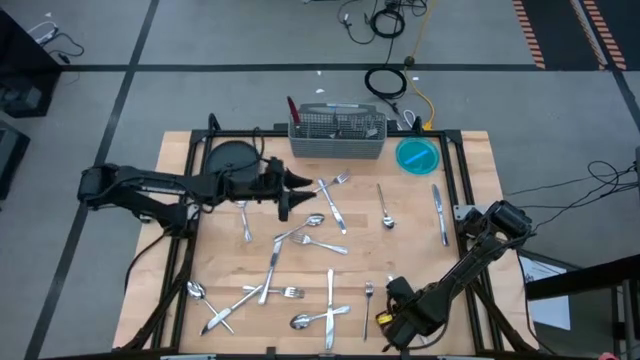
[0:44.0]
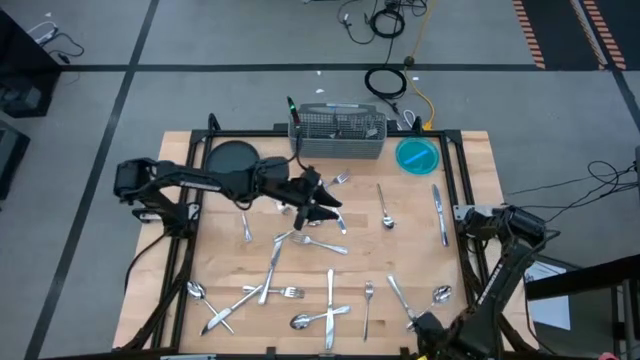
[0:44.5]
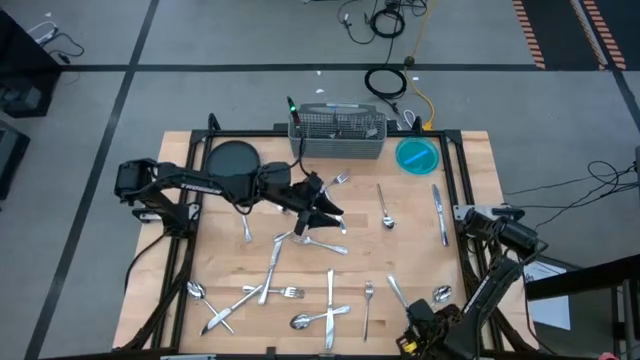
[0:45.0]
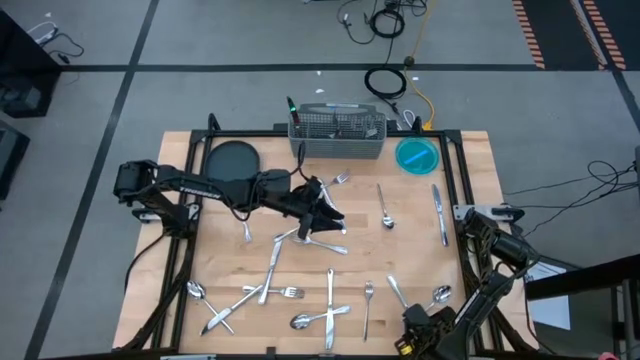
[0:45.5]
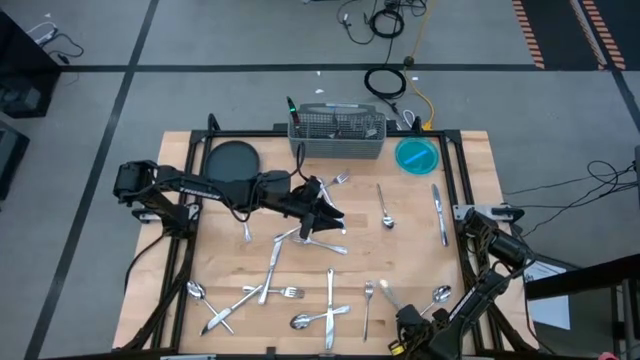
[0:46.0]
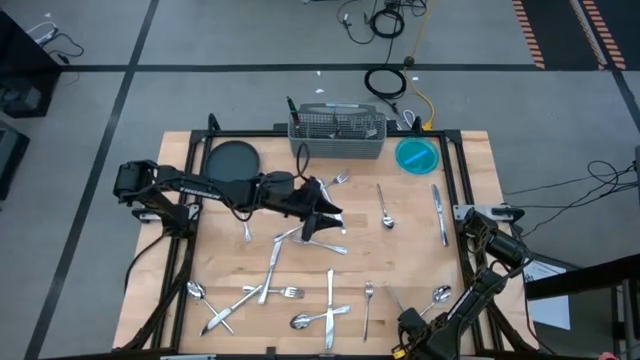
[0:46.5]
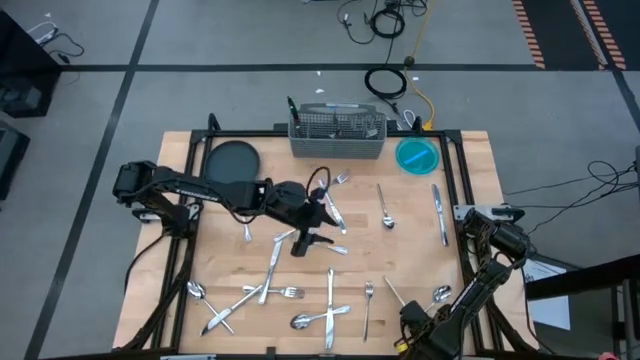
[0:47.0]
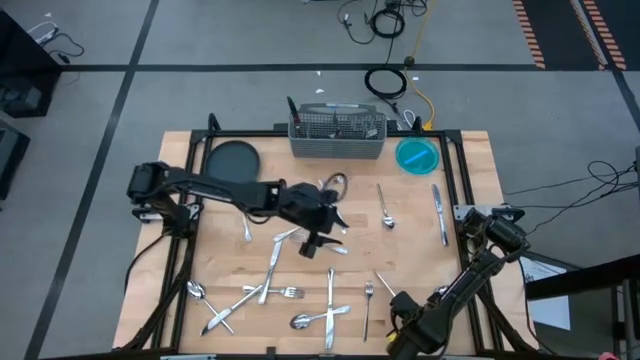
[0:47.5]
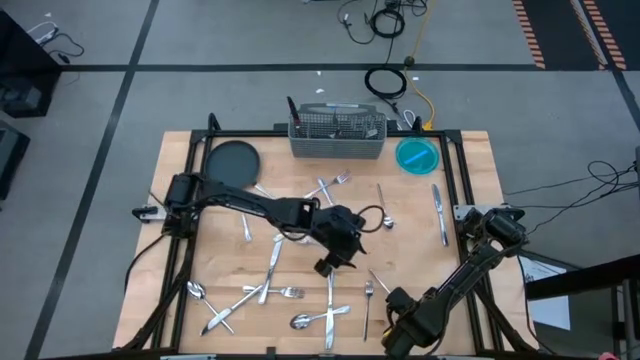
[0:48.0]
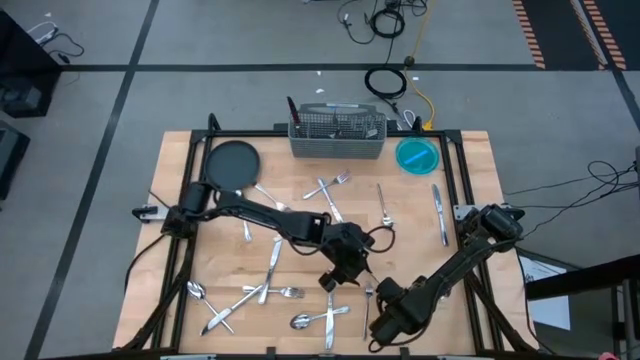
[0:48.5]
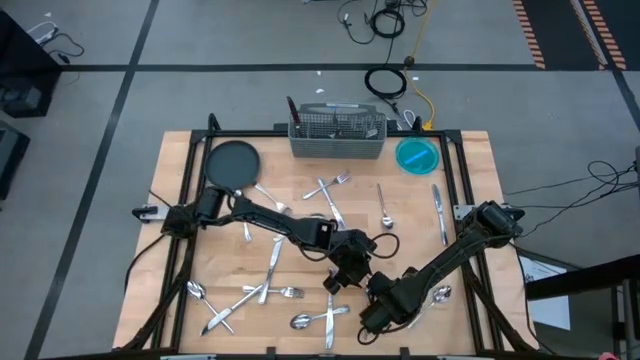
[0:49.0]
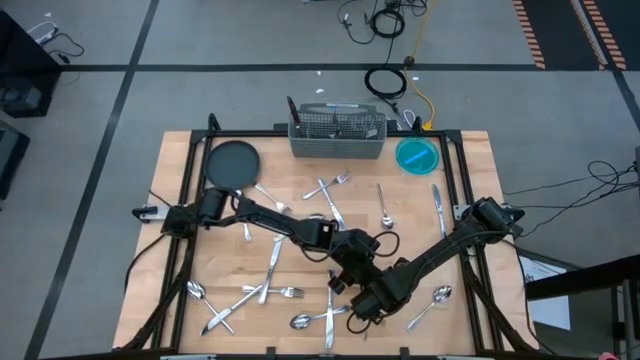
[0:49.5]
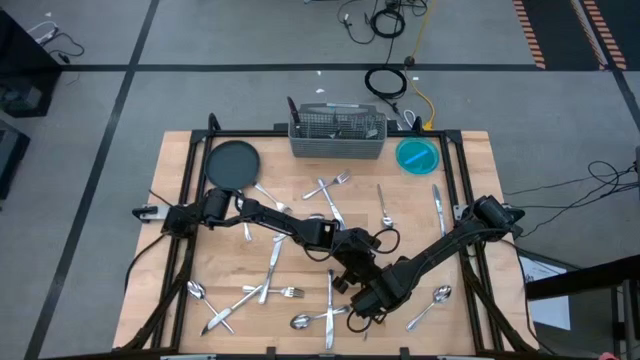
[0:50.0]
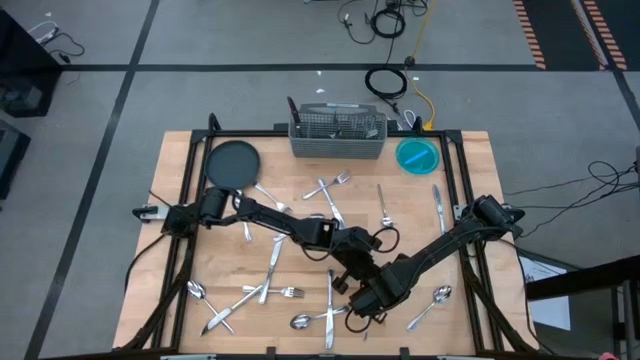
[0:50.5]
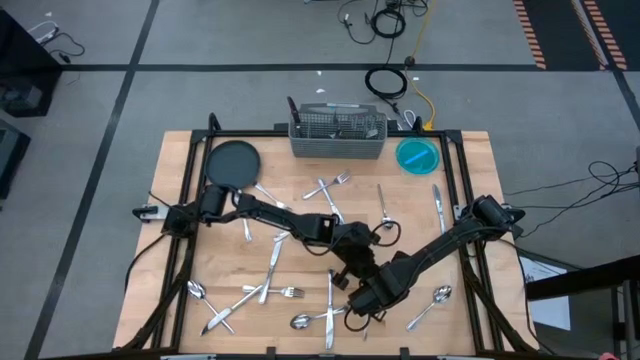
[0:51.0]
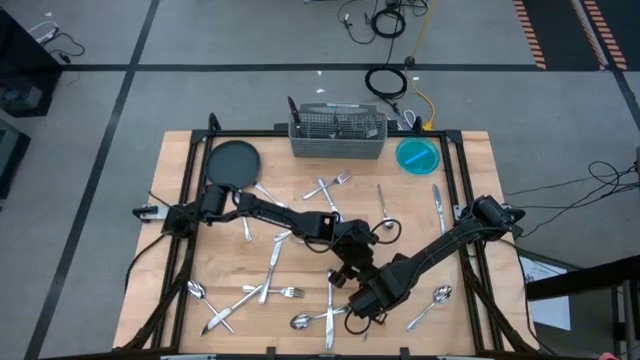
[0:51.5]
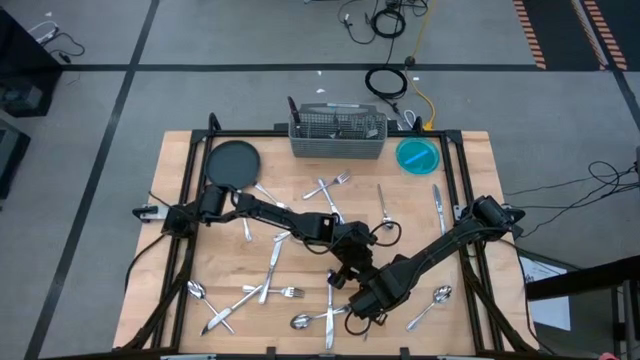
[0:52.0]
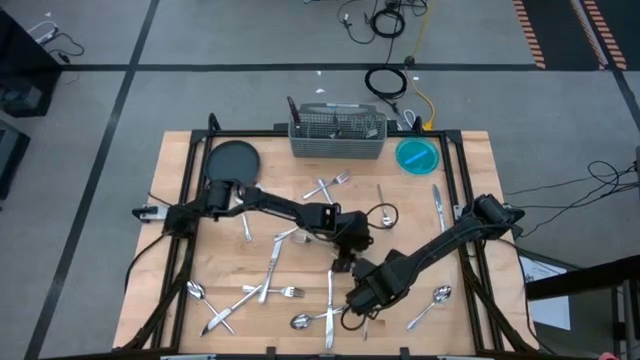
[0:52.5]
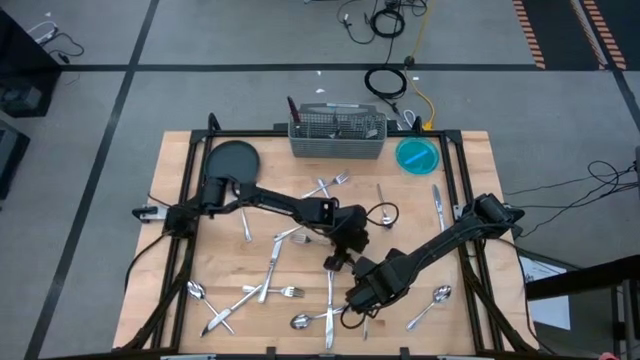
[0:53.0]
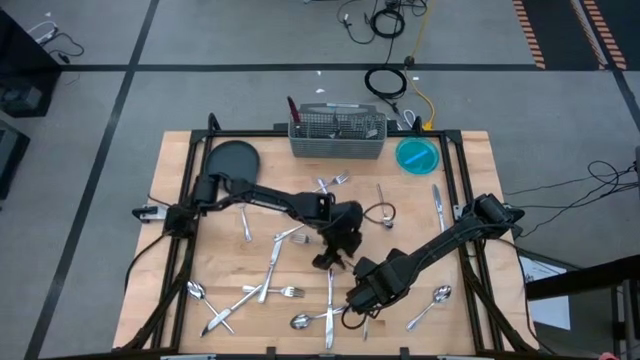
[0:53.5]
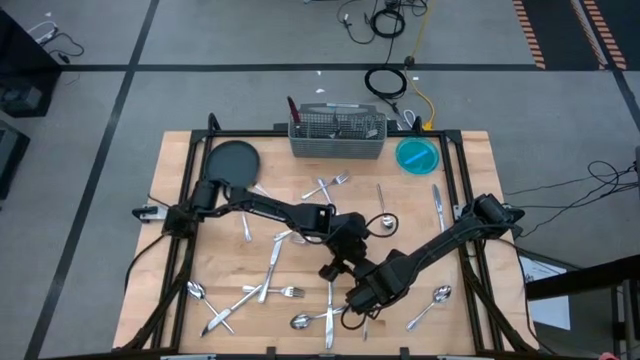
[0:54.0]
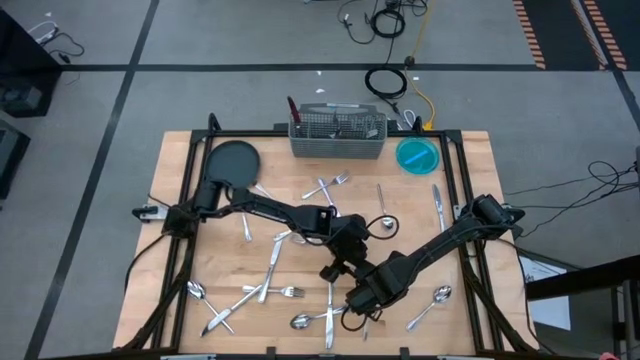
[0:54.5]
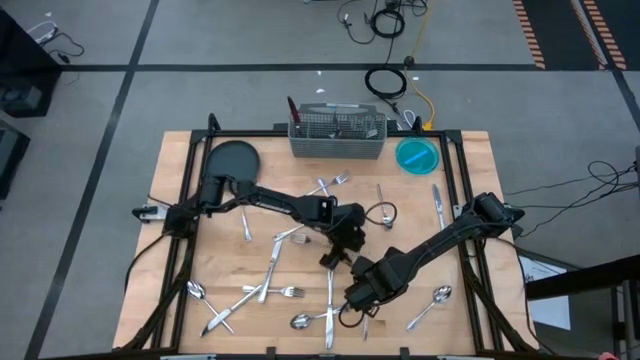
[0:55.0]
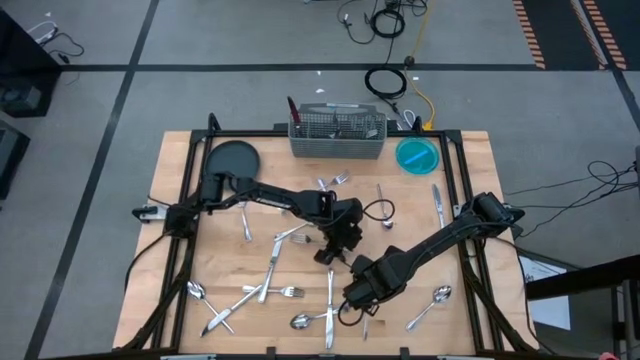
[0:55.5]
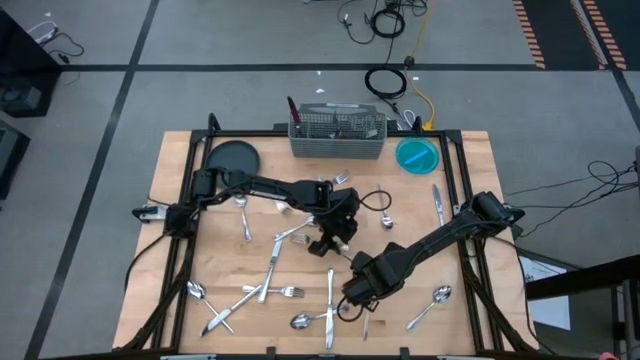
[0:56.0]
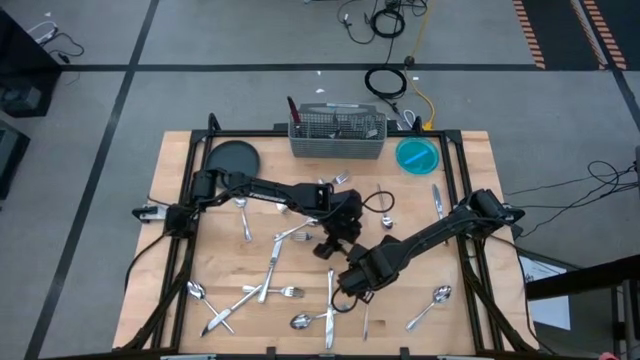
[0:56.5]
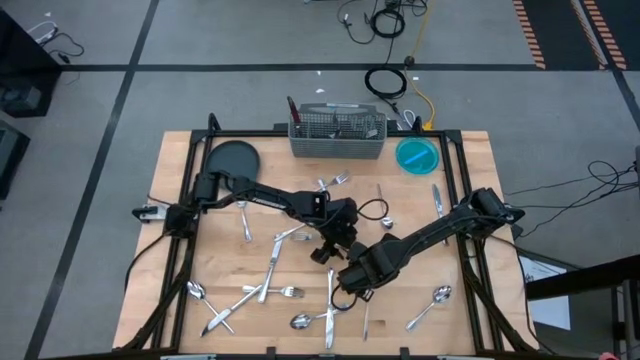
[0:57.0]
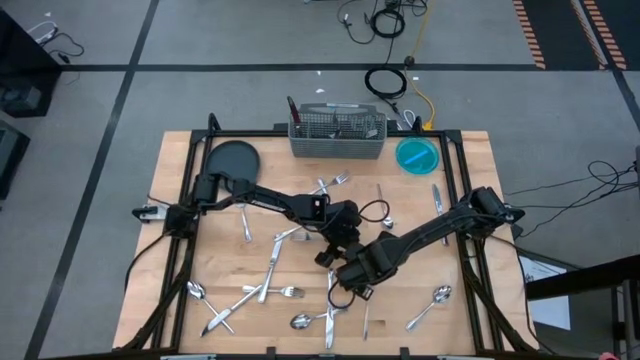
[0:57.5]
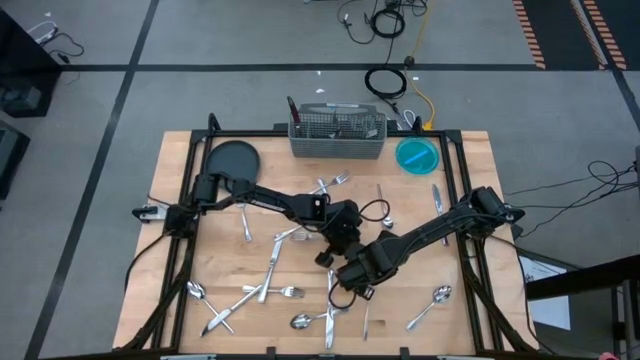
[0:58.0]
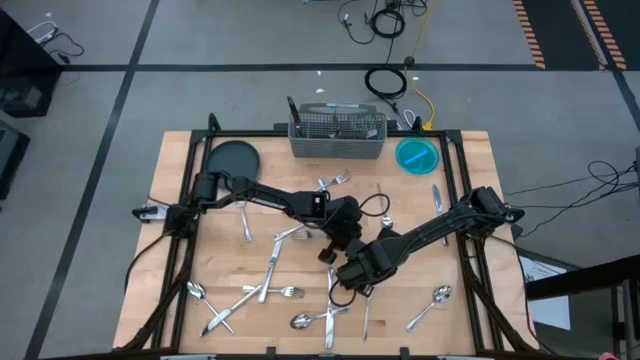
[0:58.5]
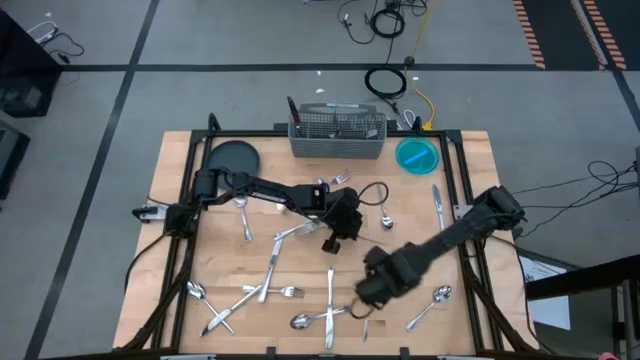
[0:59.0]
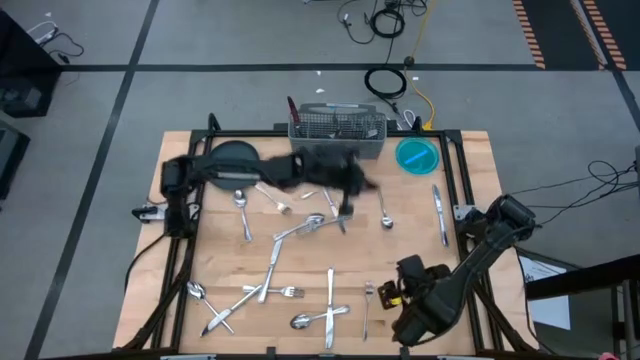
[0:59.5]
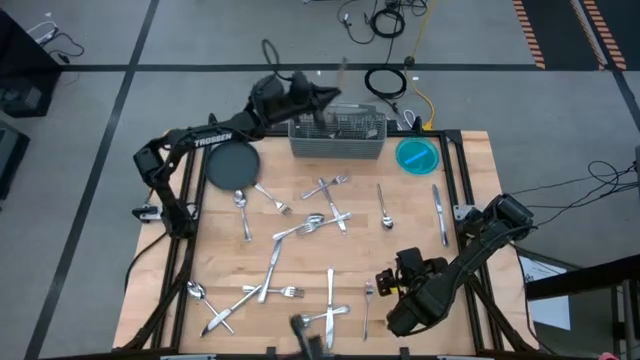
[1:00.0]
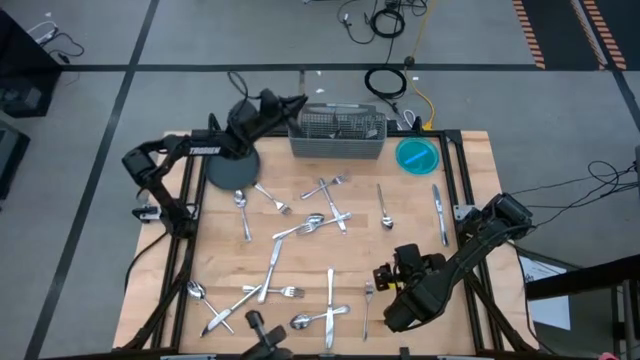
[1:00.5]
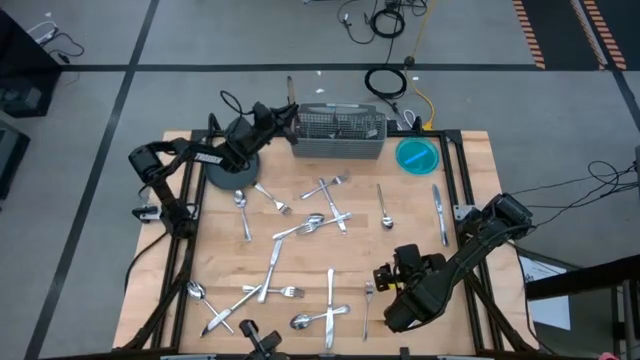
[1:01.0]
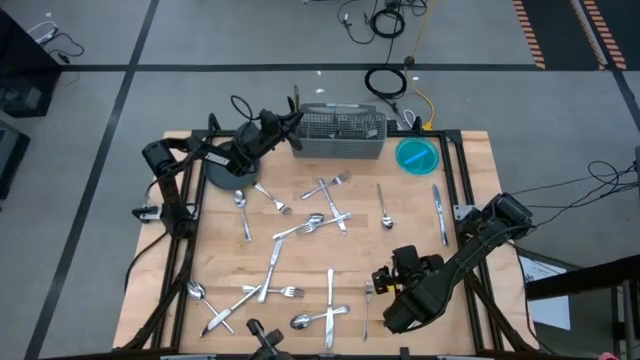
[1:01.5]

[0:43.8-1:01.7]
Task: Sort silverware
Put the table knife into the silverware organizer

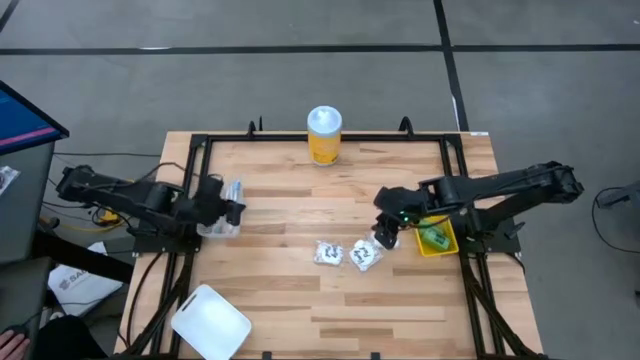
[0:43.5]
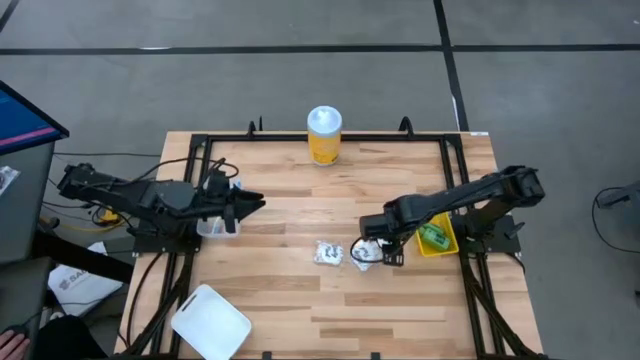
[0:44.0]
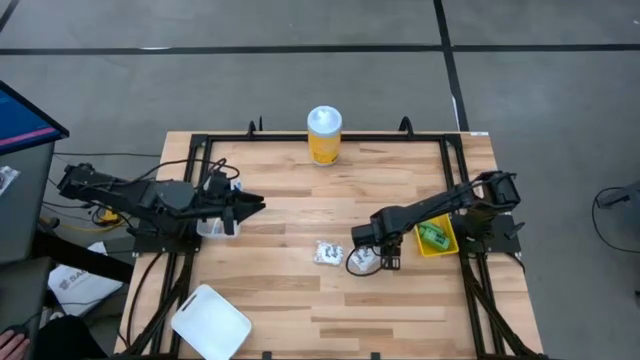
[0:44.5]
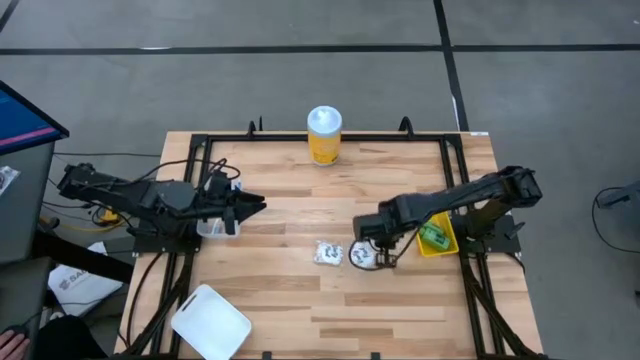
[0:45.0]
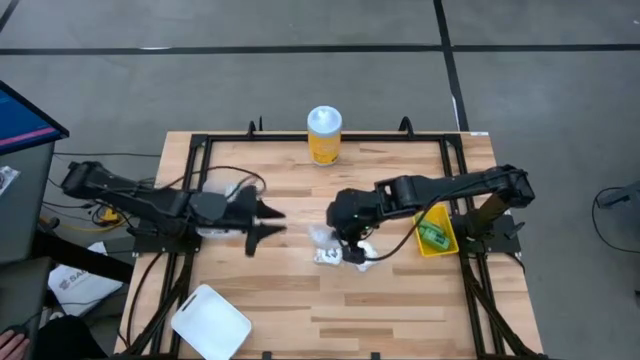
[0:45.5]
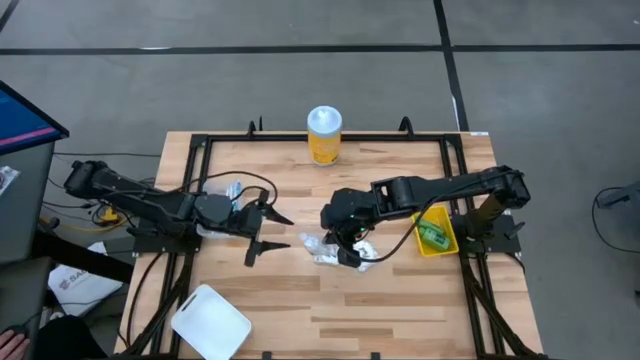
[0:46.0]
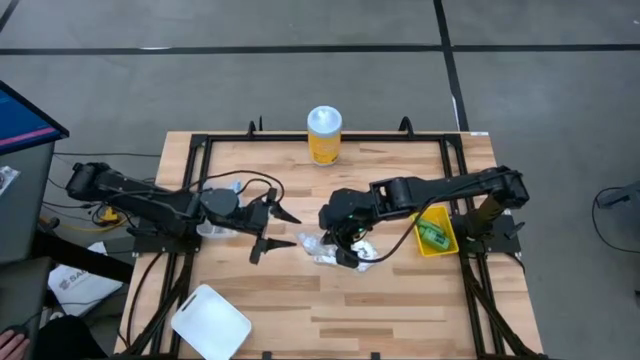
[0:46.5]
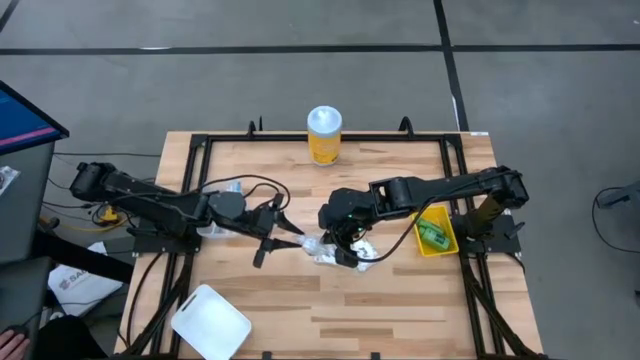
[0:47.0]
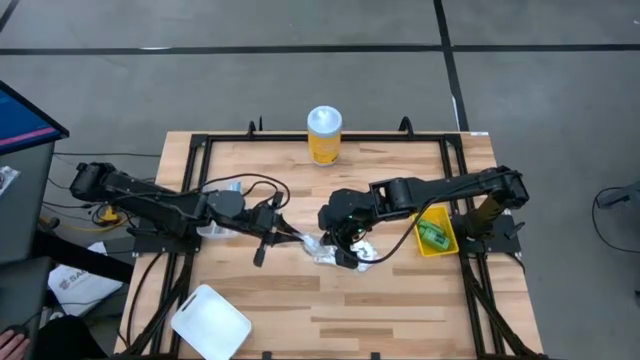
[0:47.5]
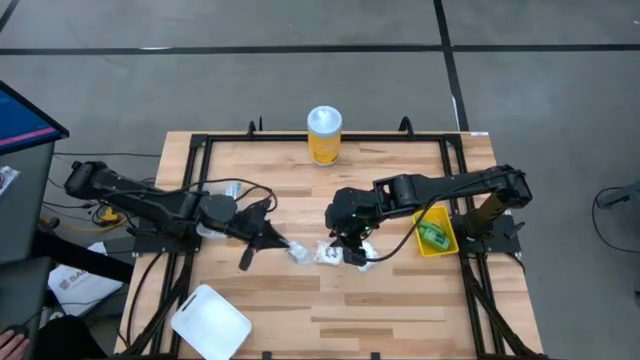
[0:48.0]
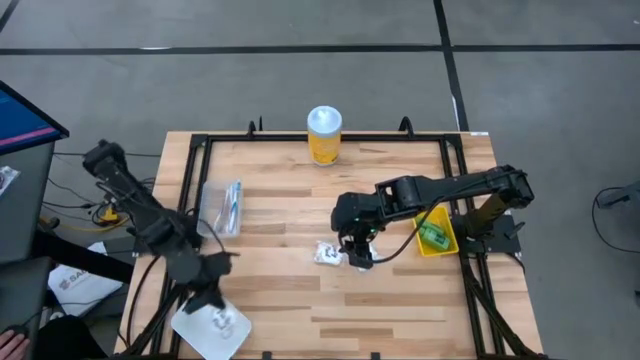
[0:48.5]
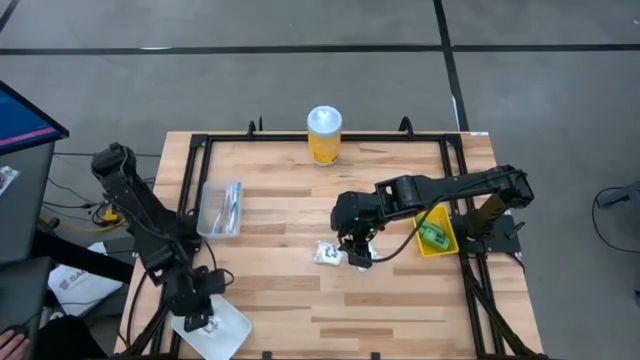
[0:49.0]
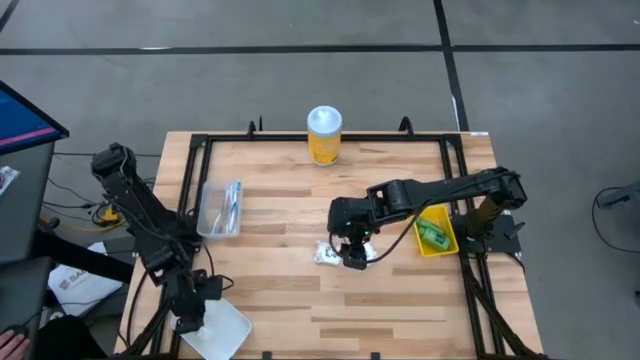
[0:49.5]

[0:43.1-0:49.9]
Task: Pick & Place Travel size toiletries
Put the right white cotton pack into the white bin
